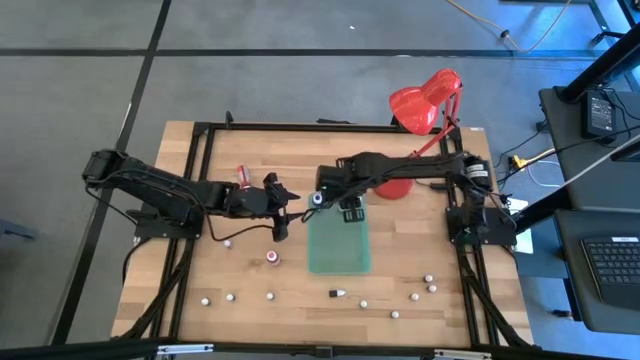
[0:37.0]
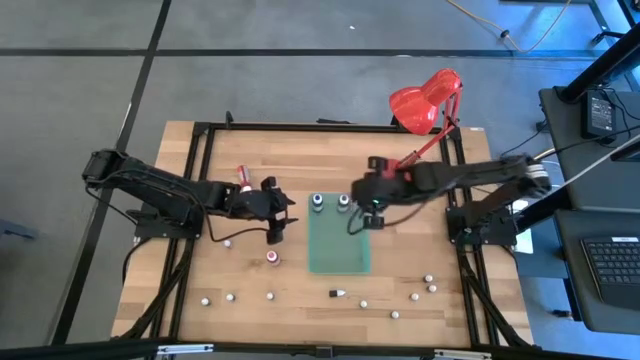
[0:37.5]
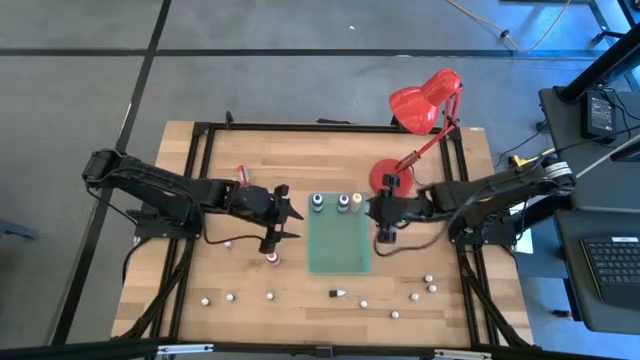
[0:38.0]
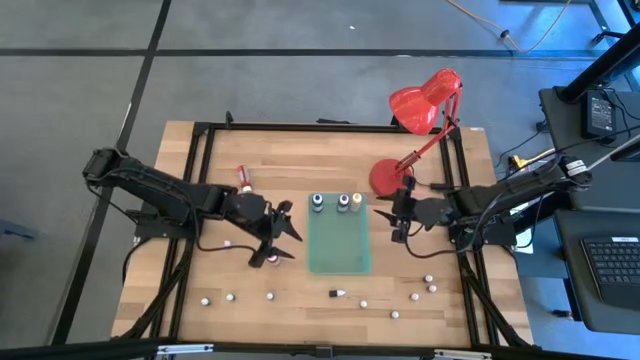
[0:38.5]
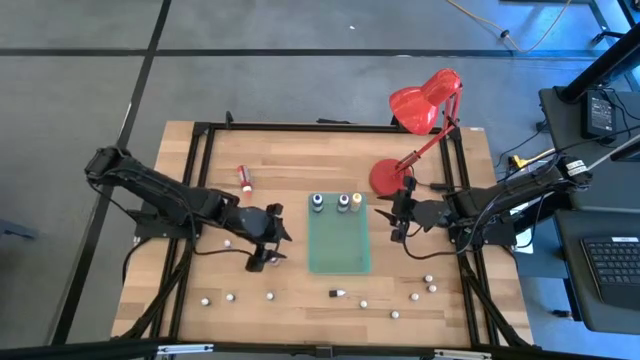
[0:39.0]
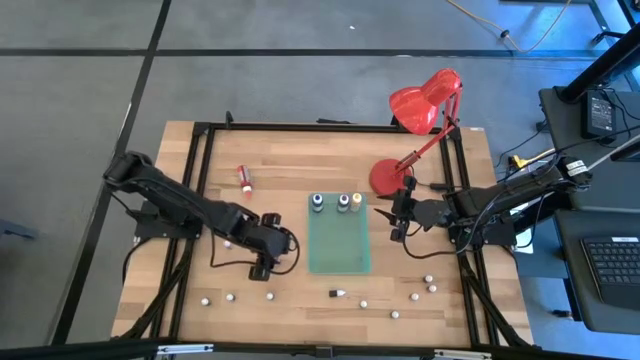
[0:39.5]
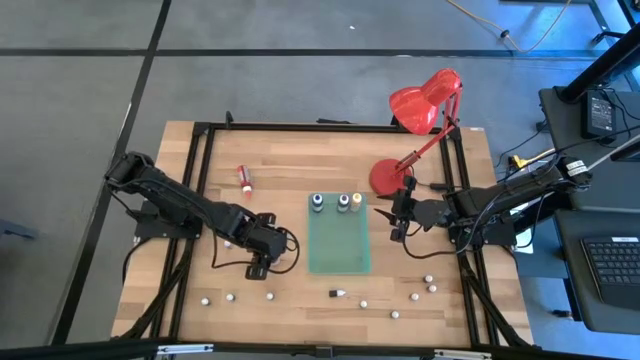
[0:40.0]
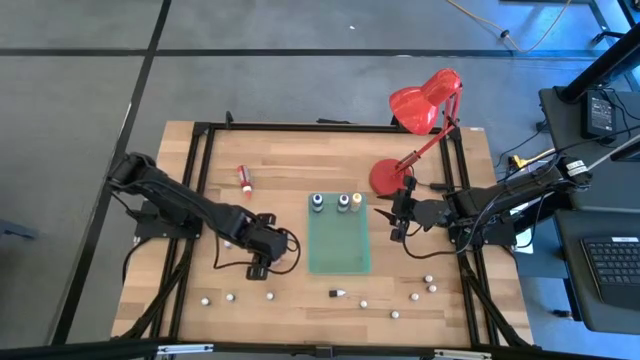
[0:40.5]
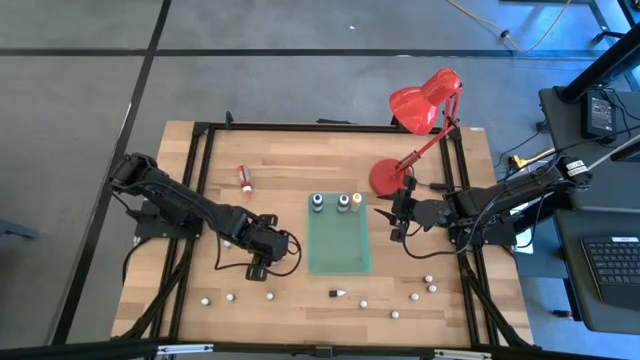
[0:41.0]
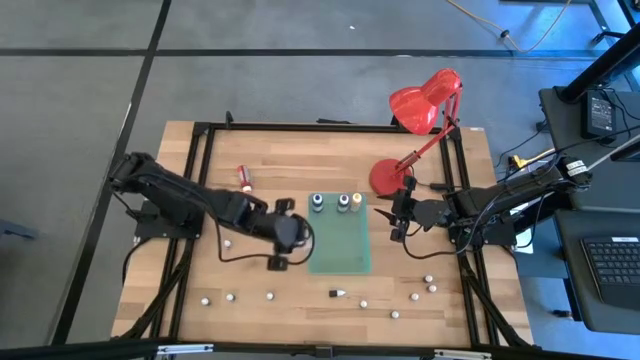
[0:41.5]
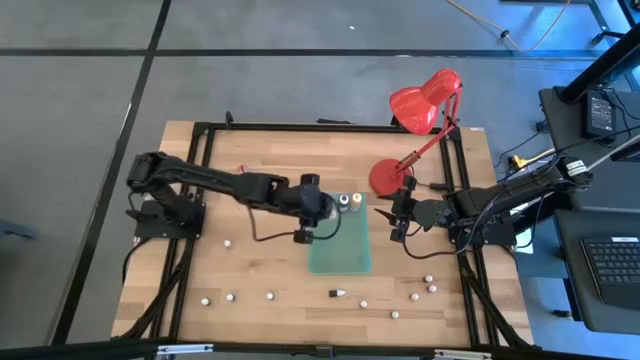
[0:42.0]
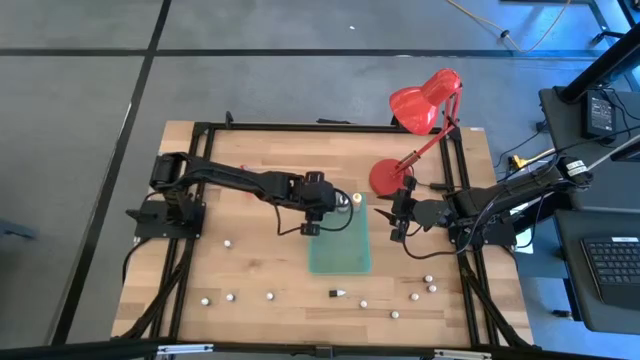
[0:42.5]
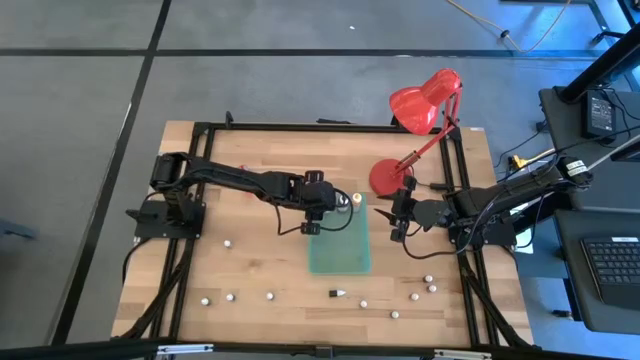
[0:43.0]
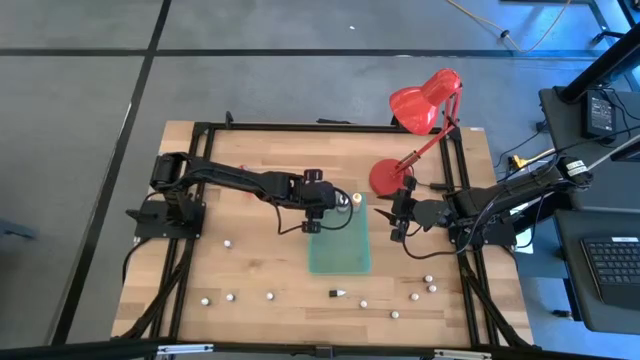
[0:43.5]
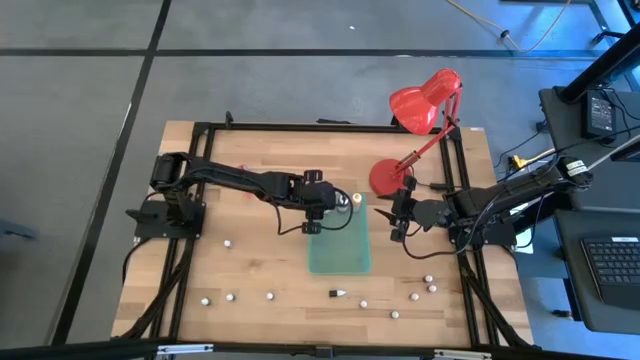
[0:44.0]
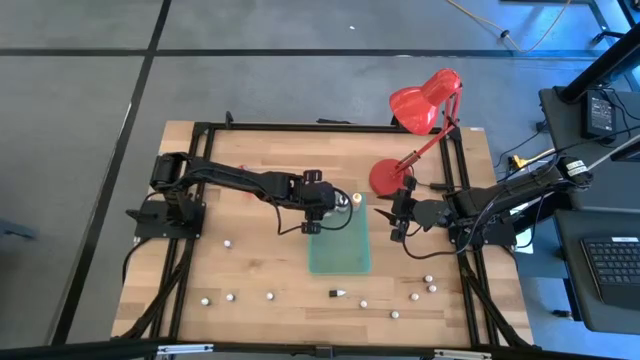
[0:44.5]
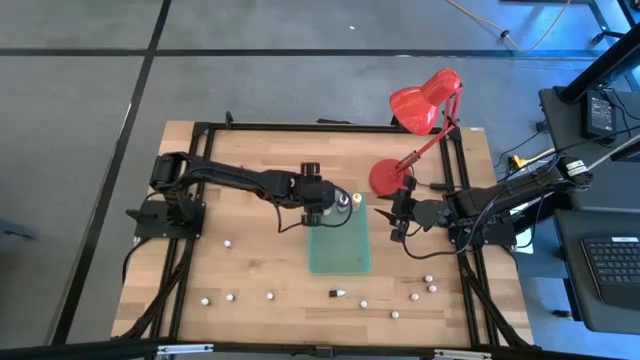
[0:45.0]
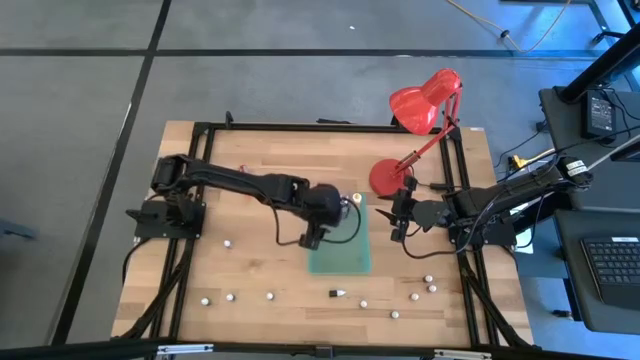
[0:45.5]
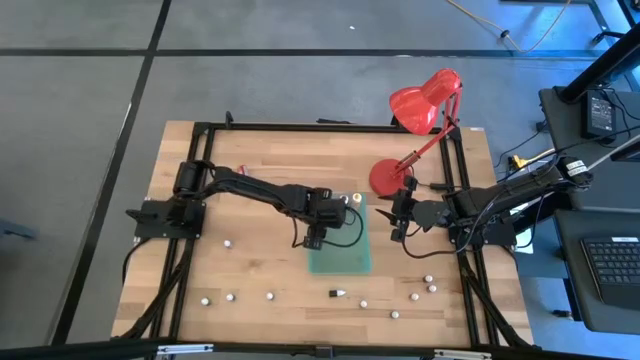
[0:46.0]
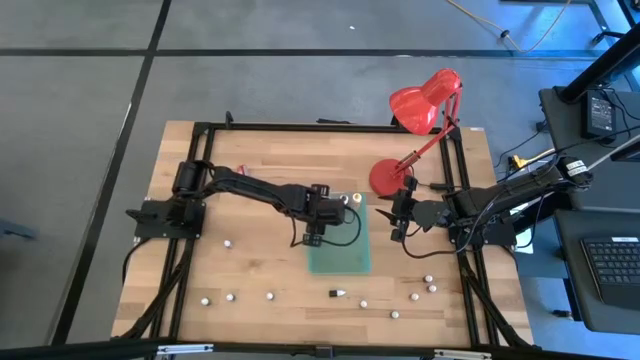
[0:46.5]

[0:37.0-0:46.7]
Task: Pick & Place food coloring
Put the large pink food coloring bottle into the green bin

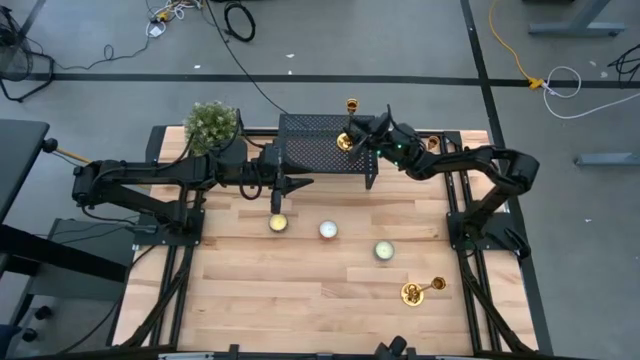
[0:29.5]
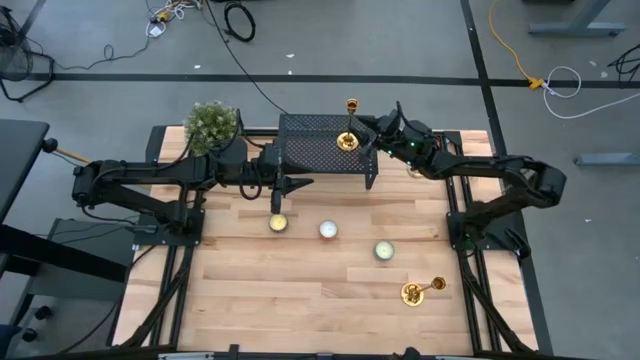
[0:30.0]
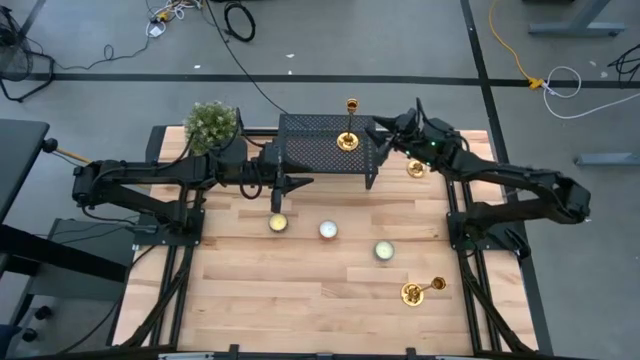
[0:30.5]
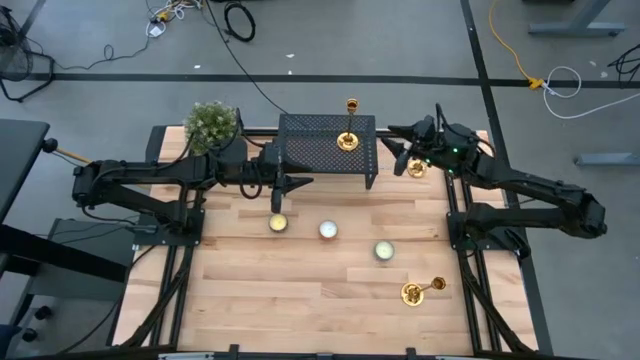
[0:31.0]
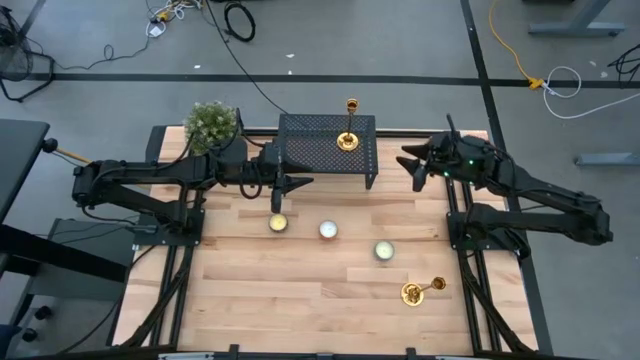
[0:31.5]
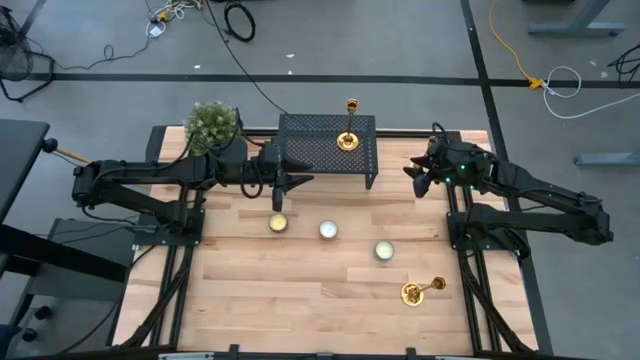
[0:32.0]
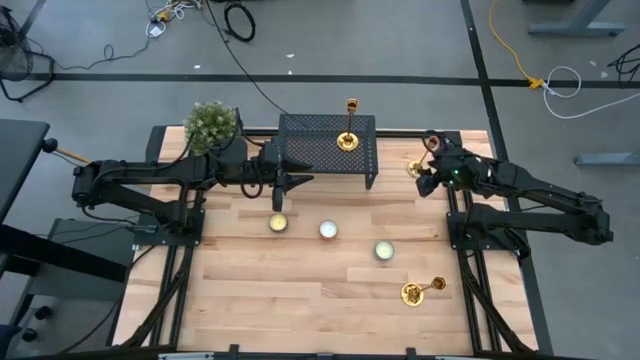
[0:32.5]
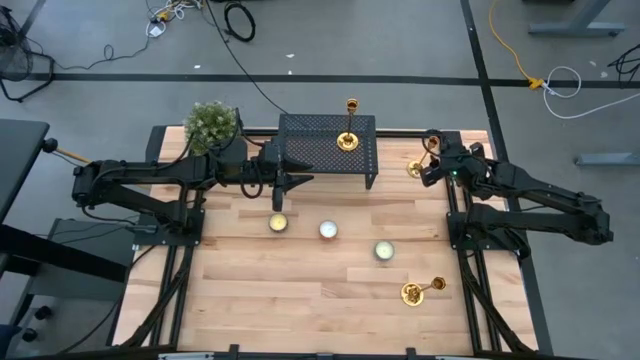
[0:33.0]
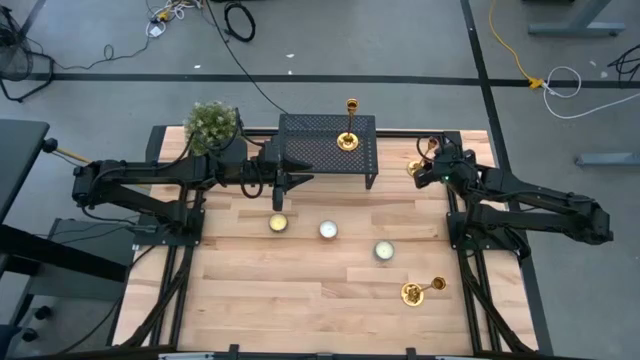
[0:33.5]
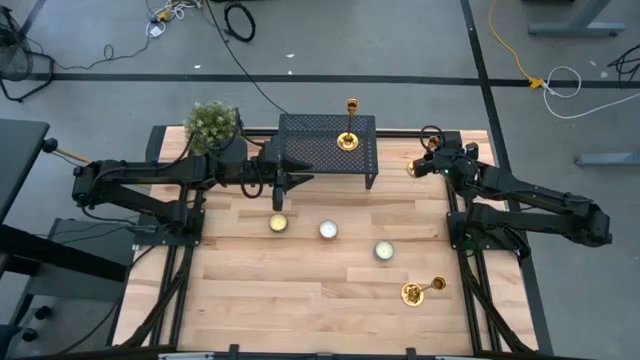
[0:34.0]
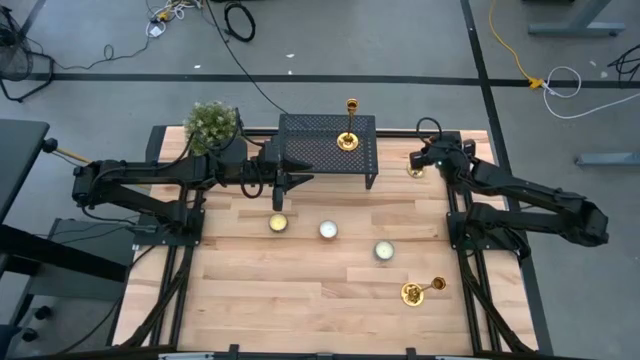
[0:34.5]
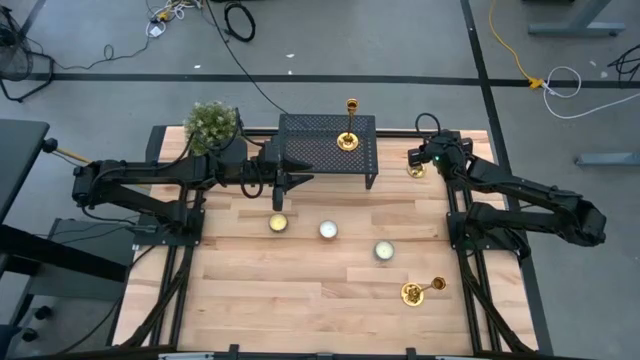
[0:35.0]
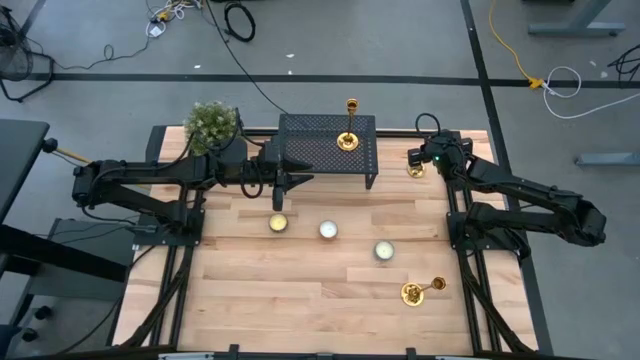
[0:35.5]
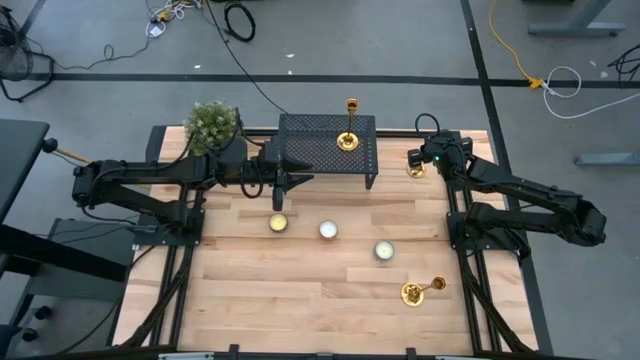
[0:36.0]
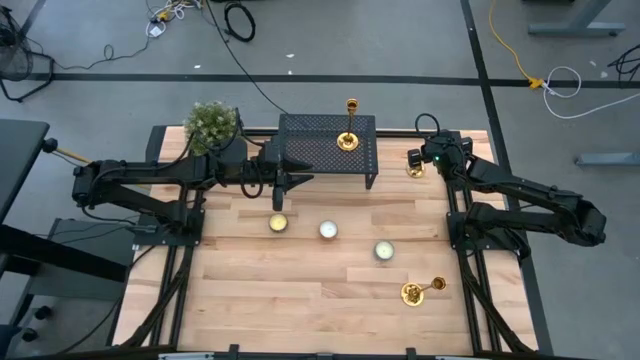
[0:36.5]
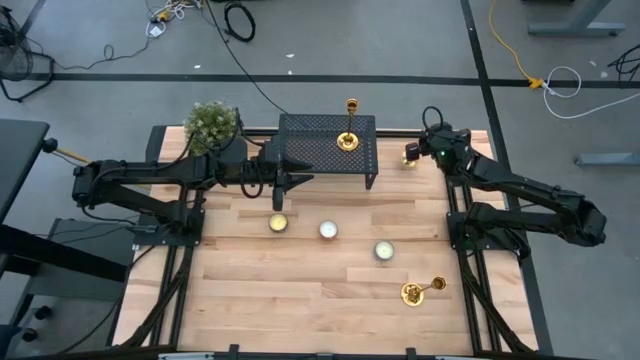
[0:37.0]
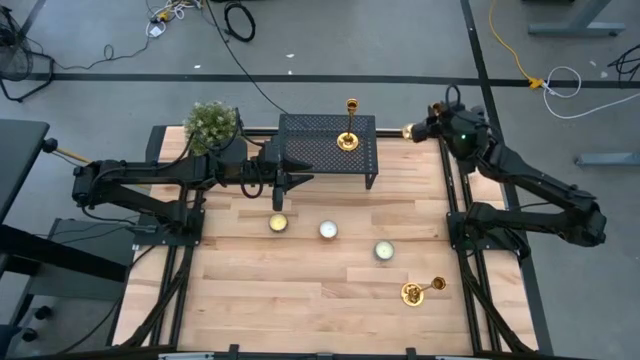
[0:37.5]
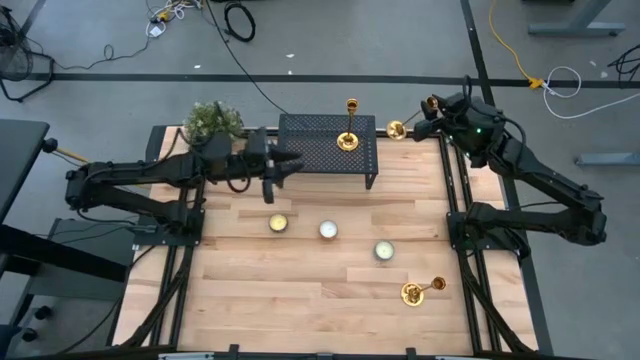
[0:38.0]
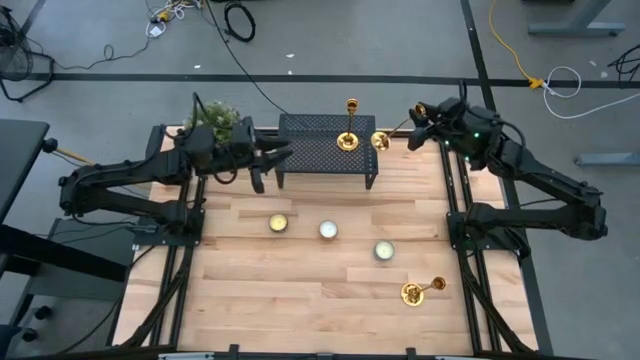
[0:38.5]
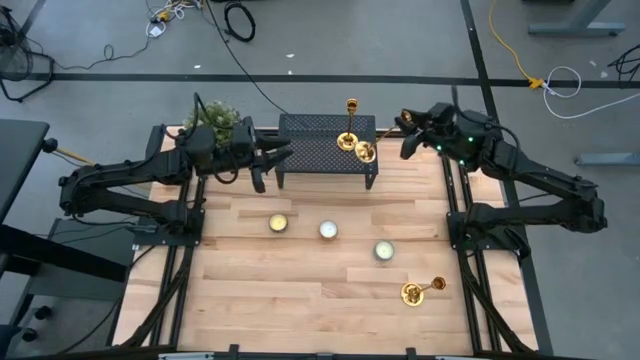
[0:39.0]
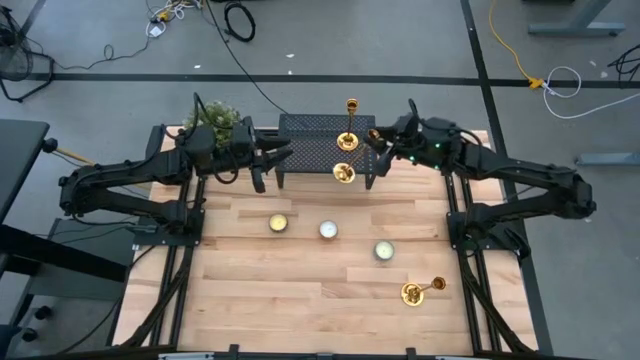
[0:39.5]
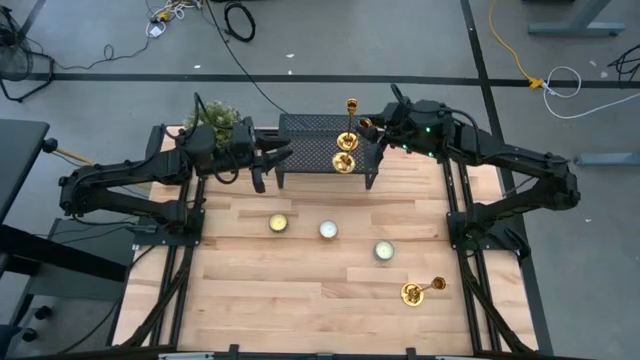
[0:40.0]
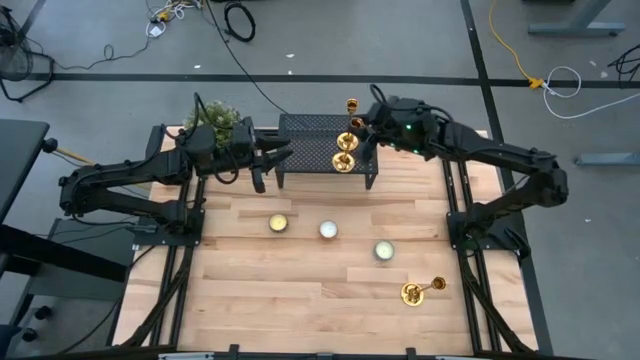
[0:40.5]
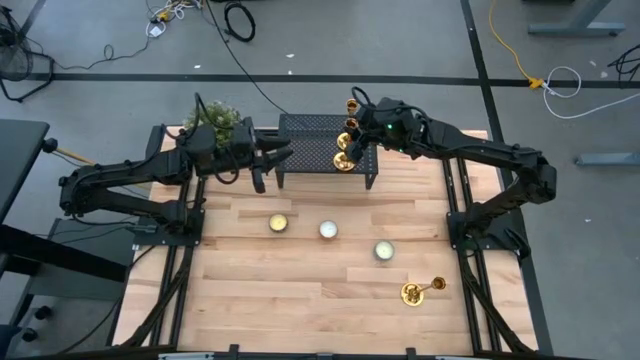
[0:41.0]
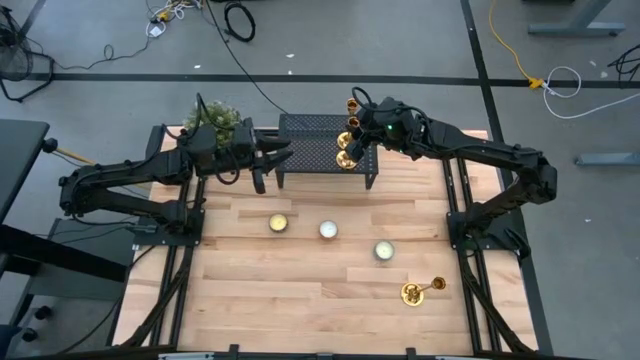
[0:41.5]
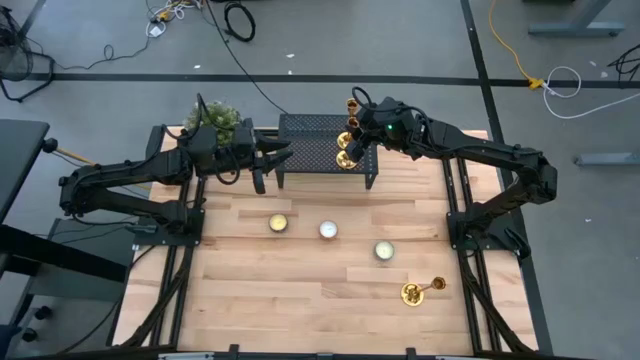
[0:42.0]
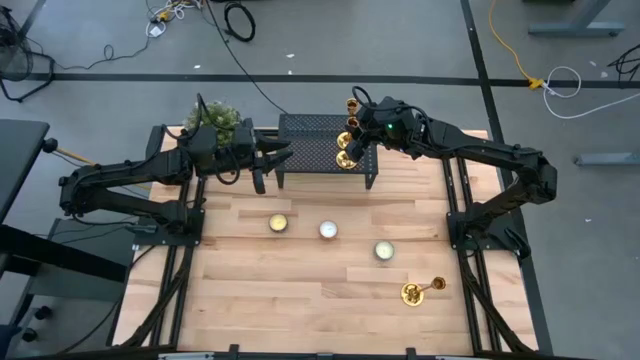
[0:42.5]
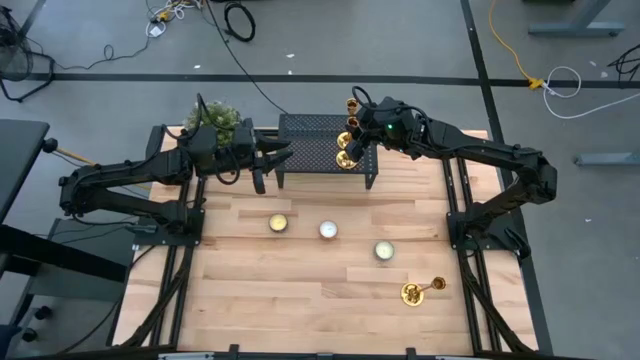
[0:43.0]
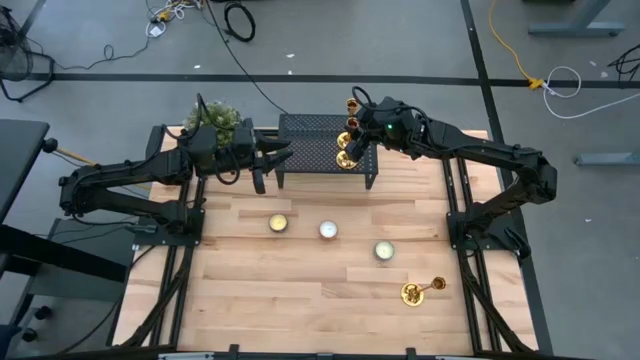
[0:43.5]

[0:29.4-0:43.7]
Task: Pick & Place candle stick holders
Put the top gold candle holder on the shelf aligned with the other gold candle holder
